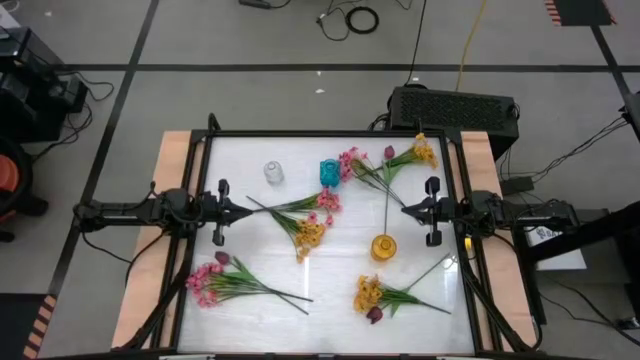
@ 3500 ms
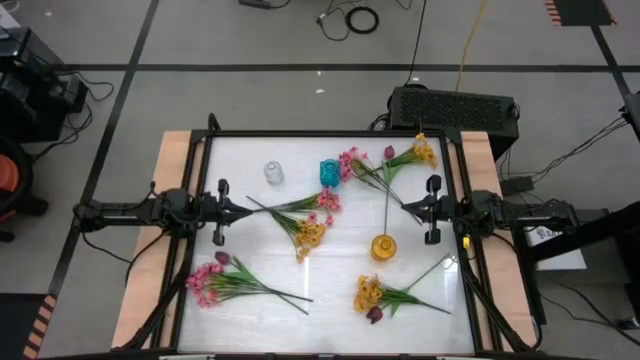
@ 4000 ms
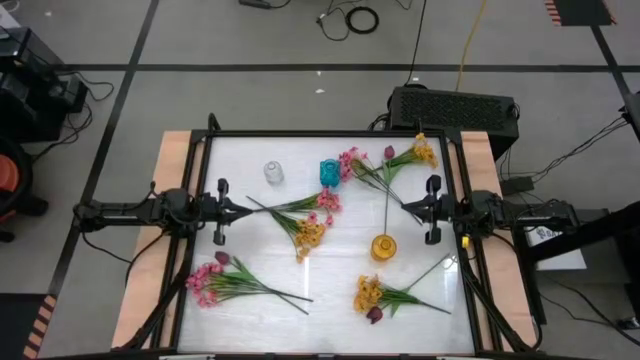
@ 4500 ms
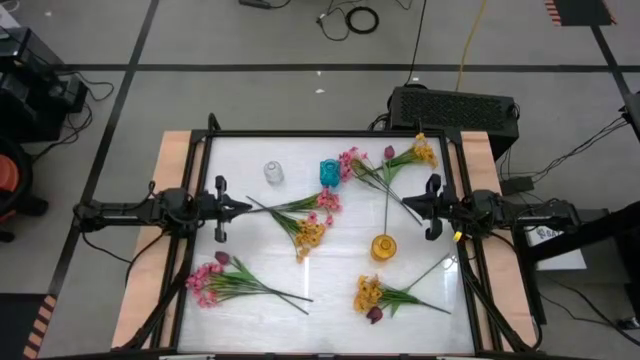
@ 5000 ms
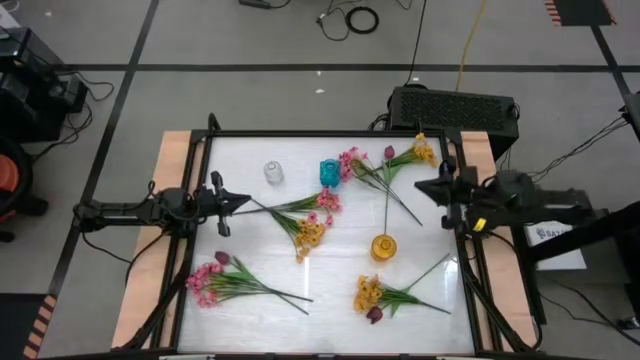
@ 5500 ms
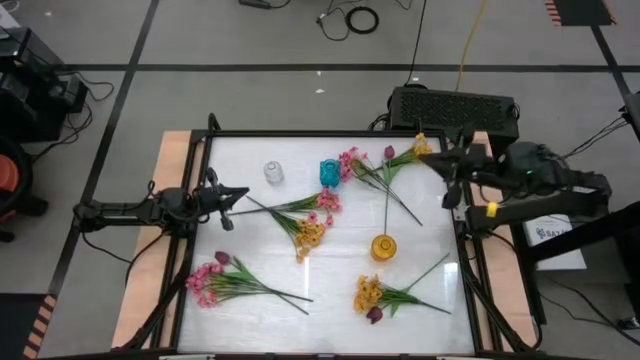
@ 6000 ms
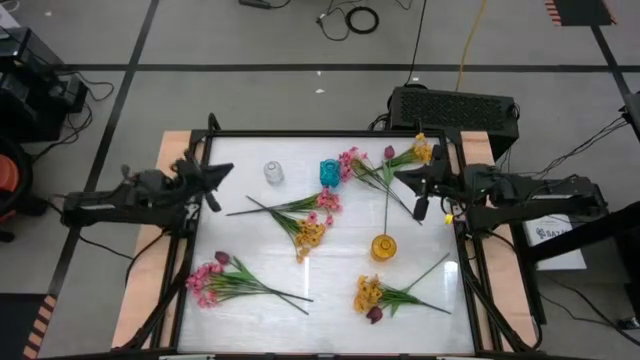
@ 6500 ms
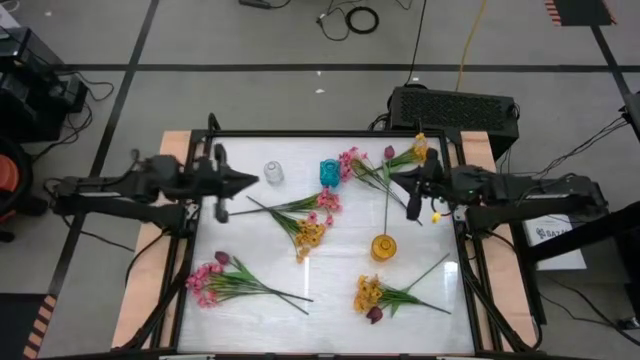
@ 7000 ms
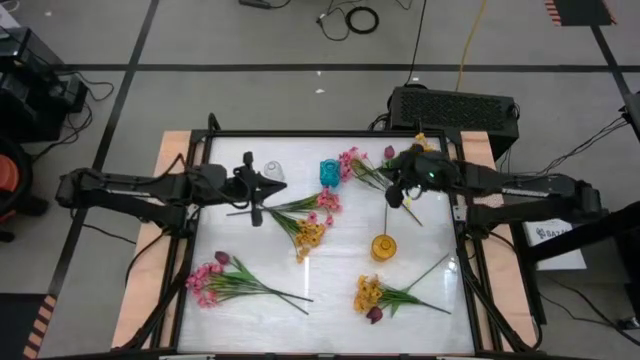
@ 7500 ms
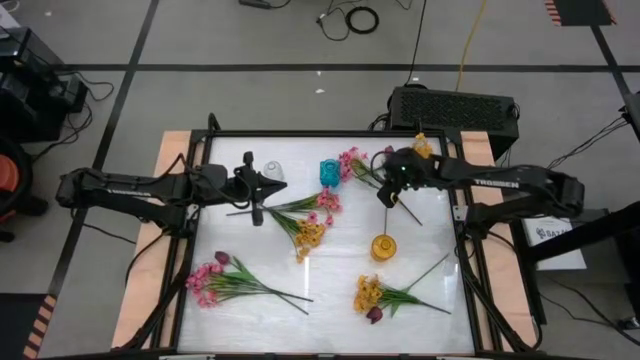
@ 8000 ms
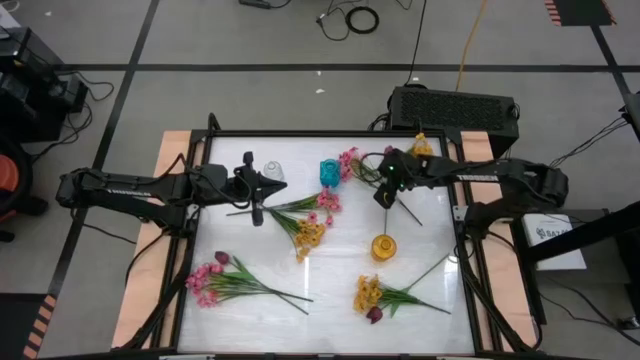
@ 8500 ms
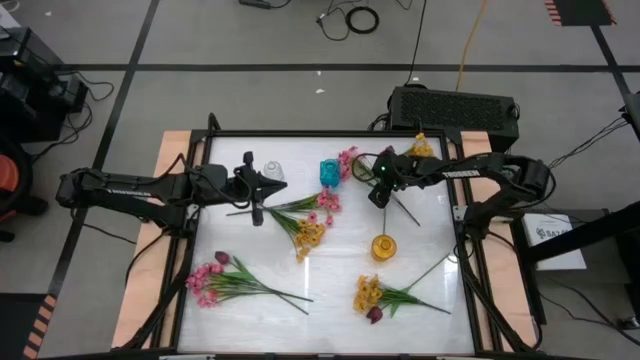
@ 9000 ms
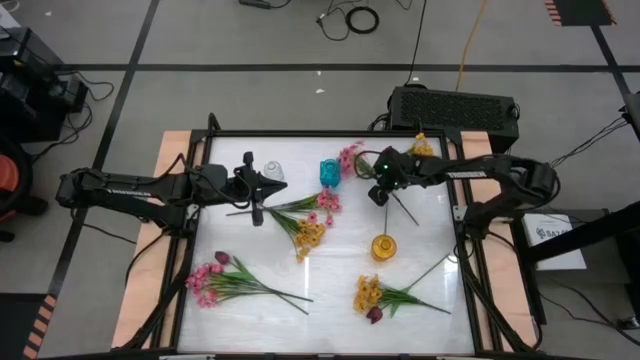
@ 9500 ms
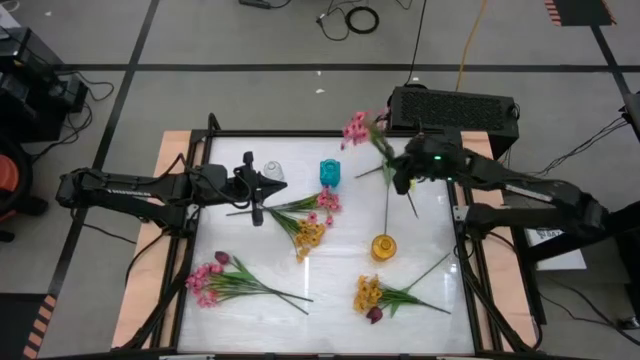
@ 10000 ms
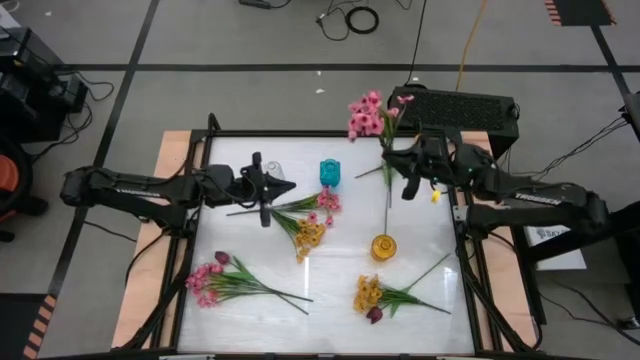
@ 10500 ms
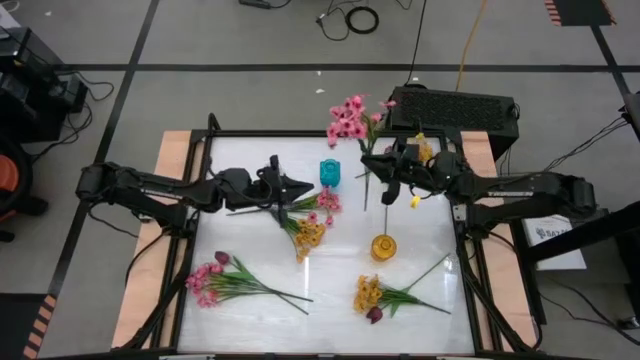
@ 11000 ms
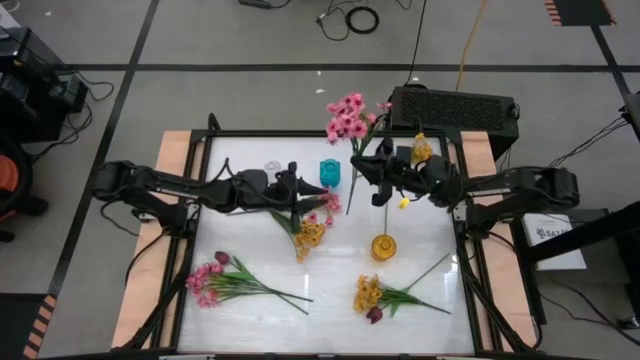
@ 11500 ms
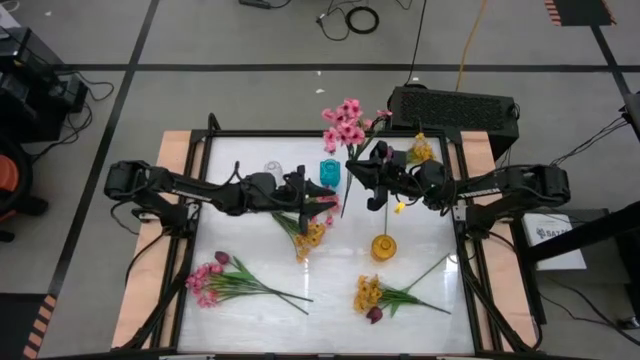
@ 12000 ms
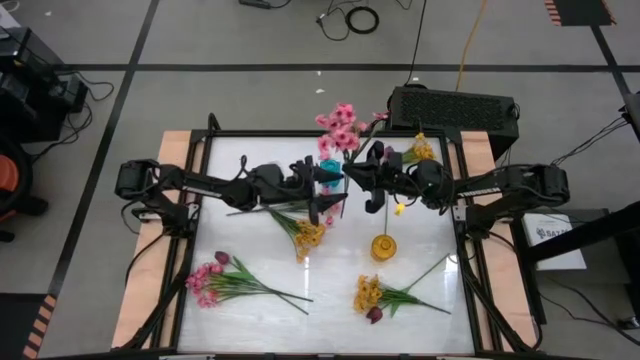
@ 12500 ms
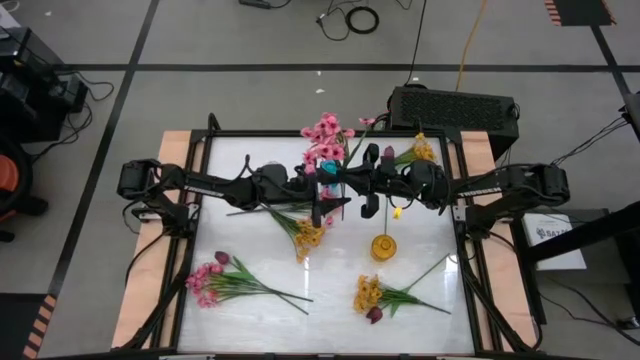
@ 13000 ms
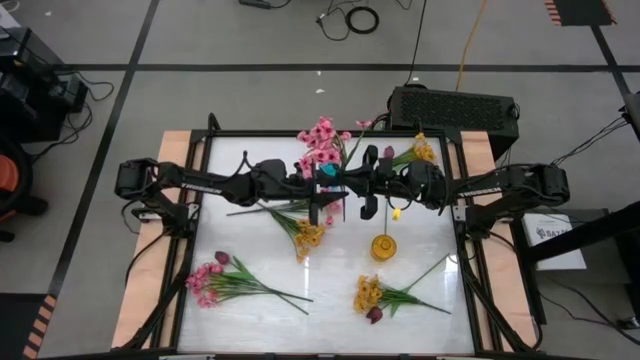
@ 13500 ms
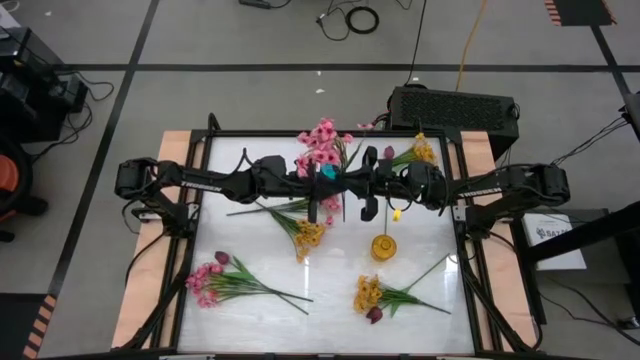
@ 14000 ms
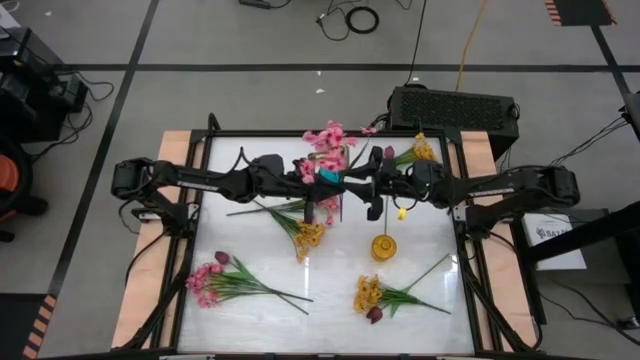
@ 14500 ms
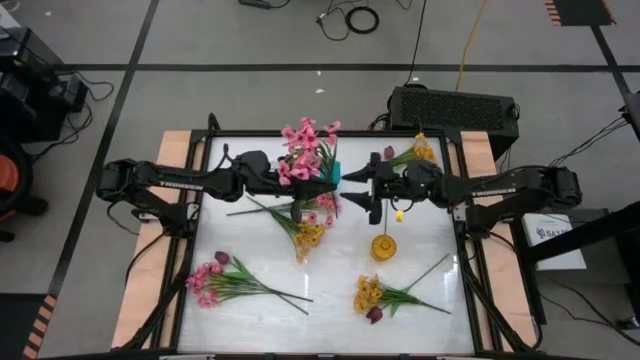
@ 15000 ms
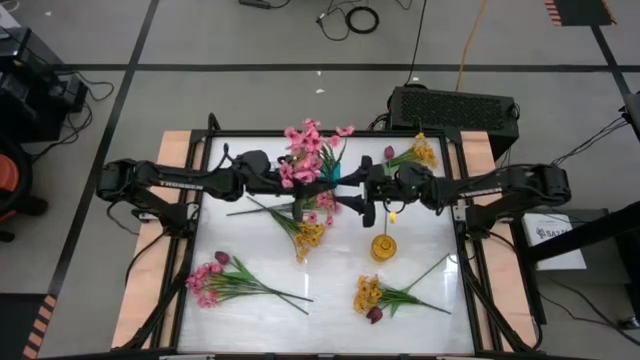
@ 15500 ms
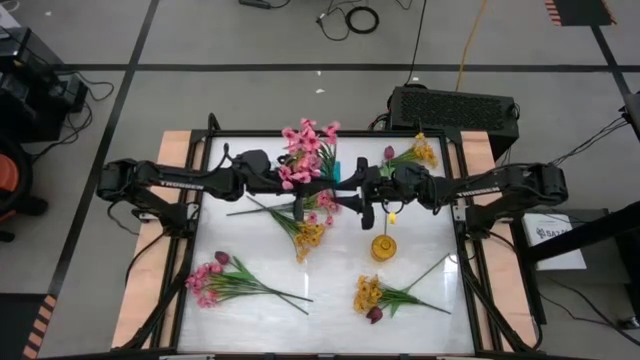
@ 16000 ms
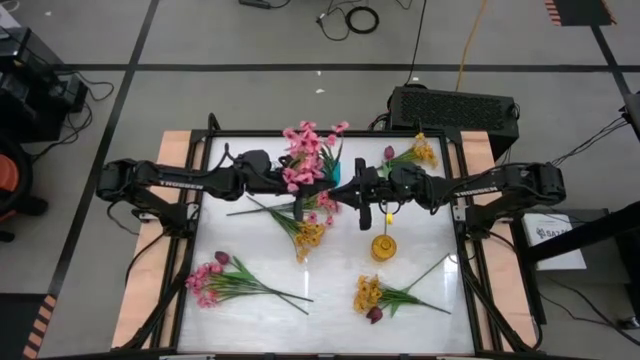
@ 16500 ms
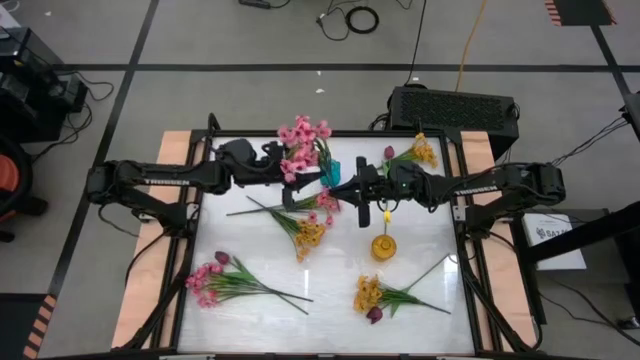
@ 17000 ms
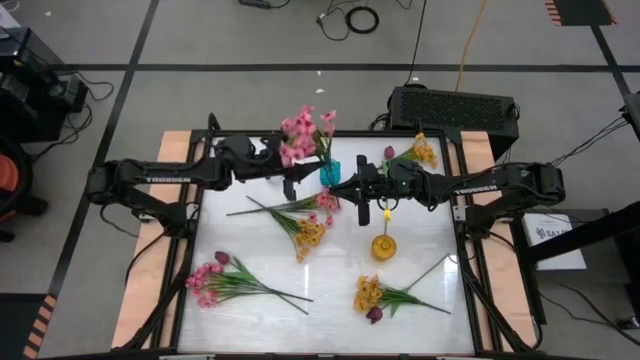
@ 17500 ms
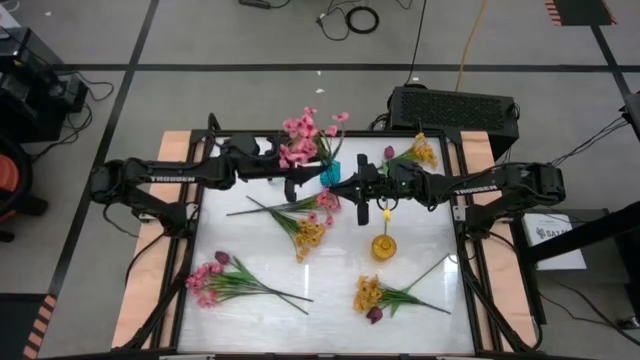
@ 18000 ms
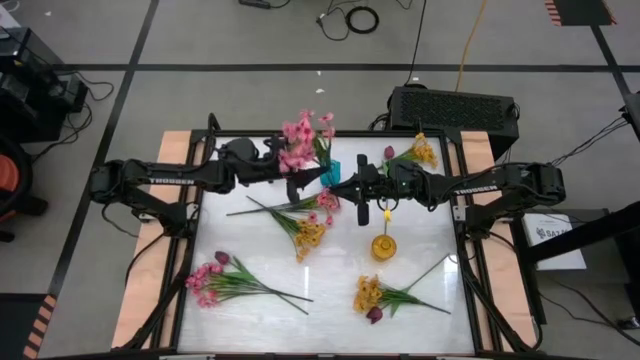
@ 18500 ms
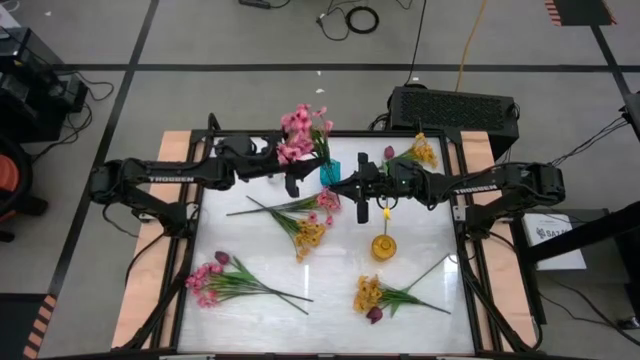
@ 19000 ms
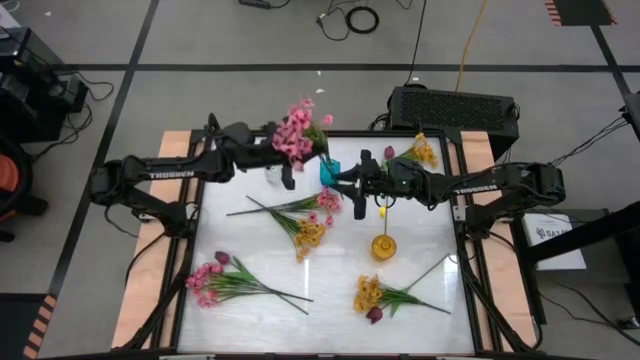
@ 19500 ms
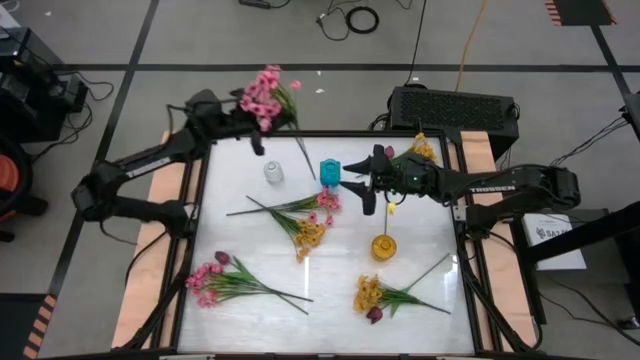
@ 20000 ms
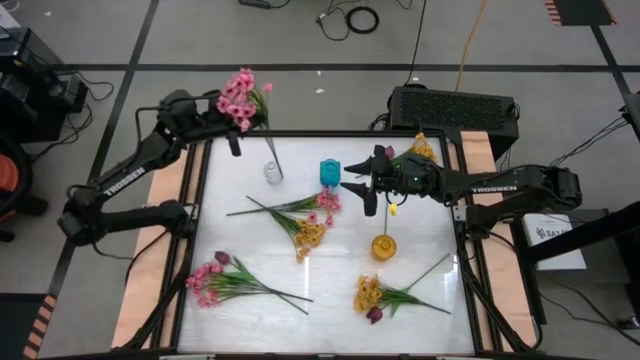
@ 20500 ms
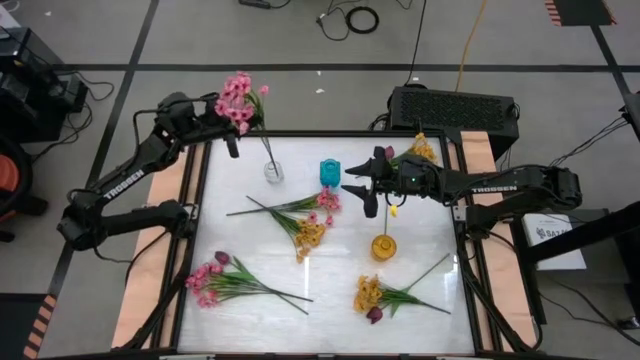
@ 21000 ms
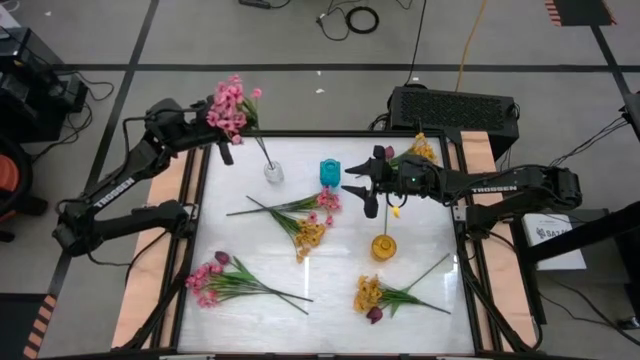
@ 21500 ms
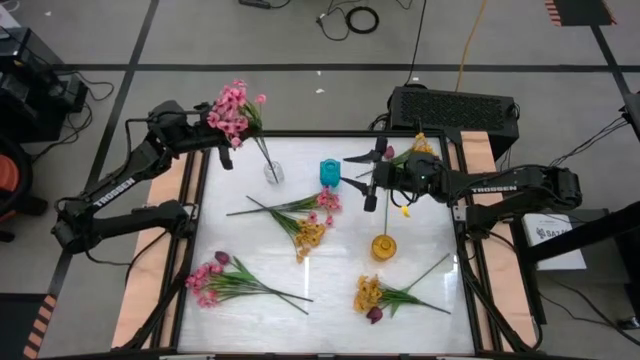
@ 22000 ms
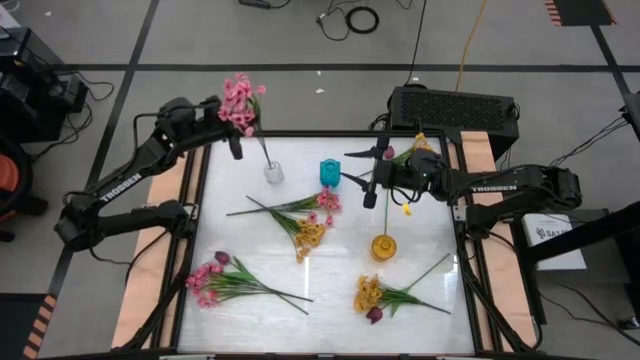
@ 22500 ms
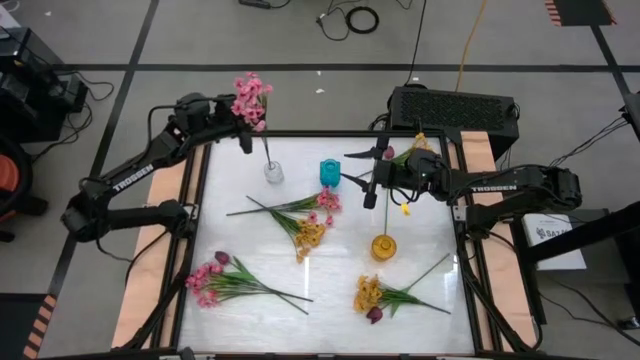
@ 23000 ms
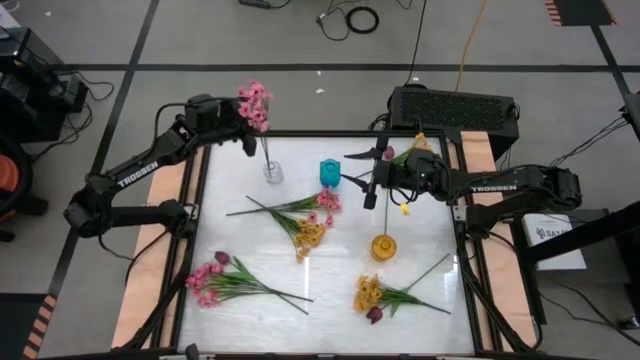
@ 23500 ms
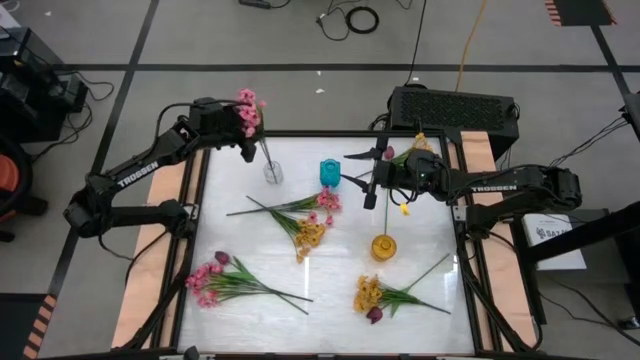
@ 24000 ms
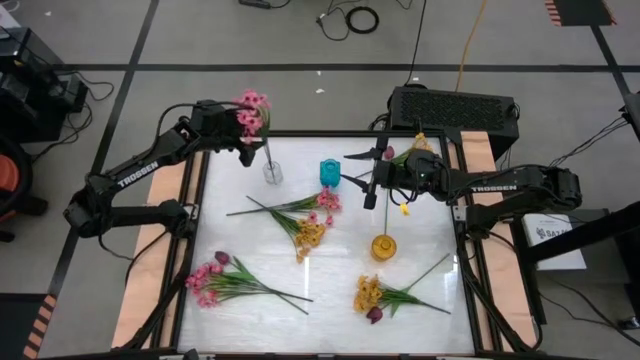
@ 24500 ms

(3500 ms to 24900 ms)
Task: Sort flowers into vase by color
Put the top pink flowers into the transparent vase
